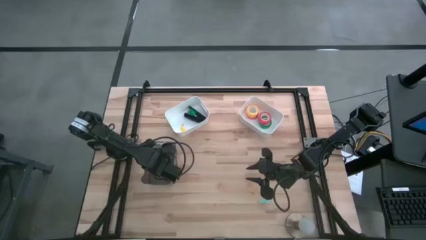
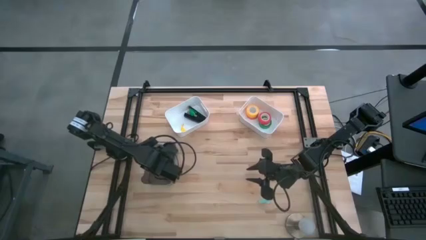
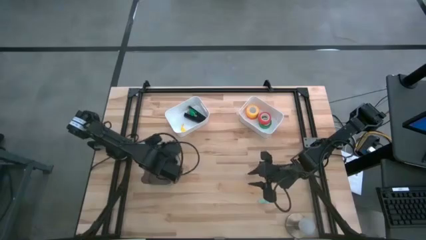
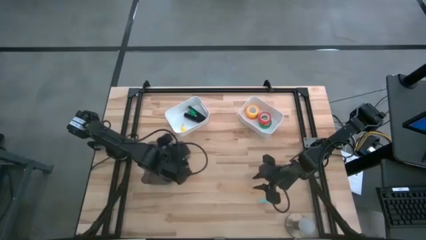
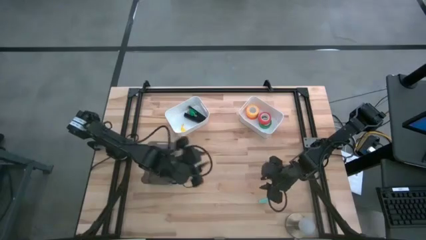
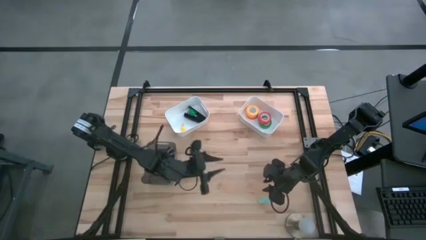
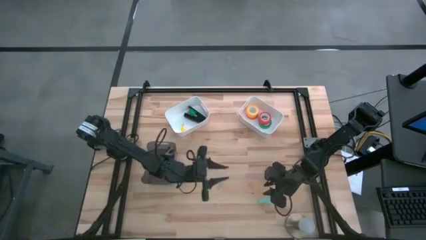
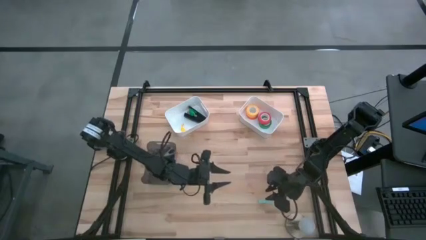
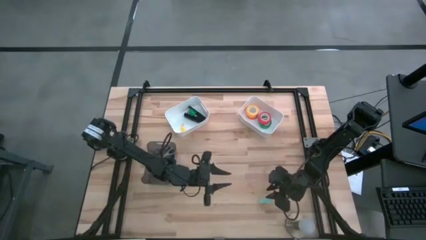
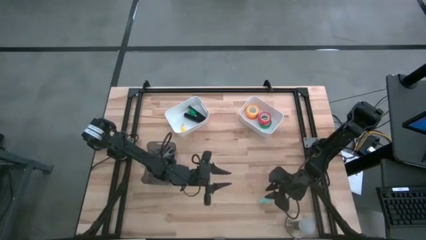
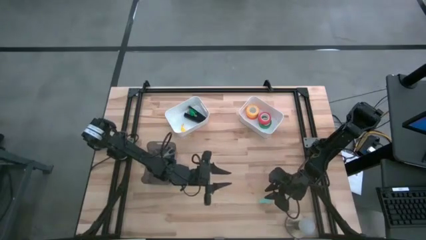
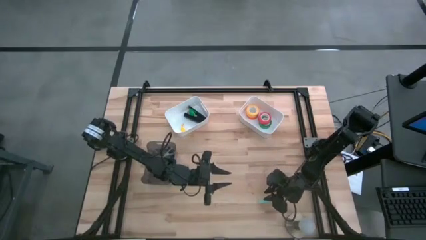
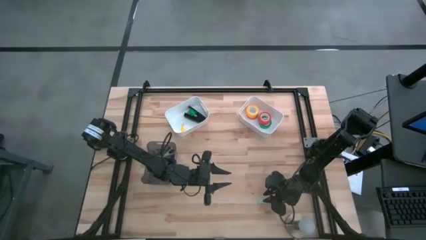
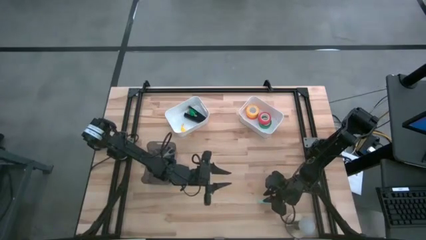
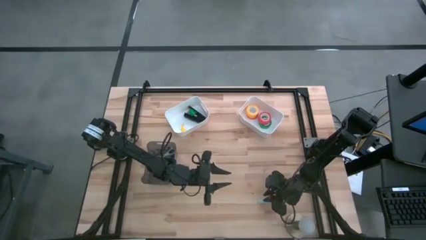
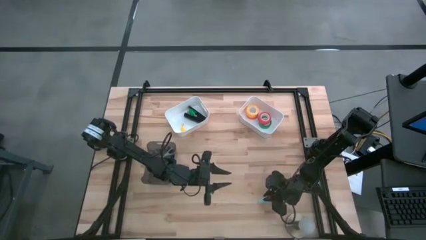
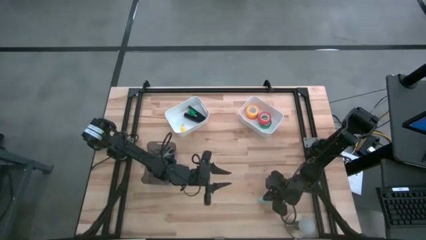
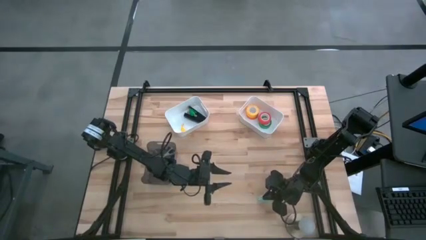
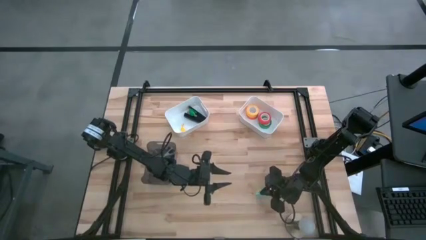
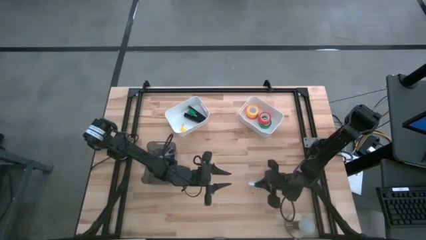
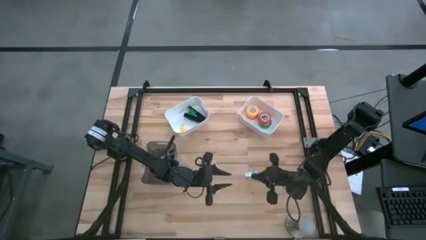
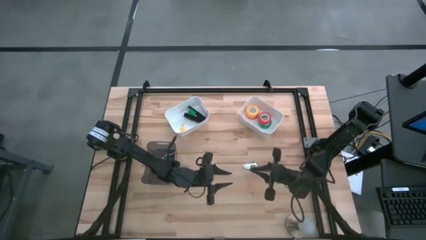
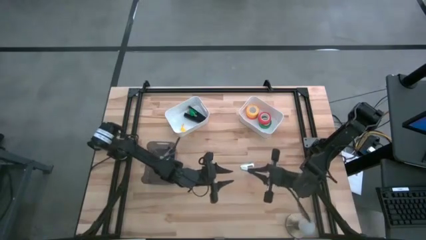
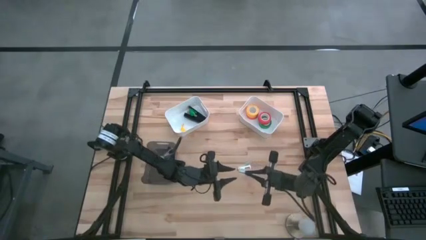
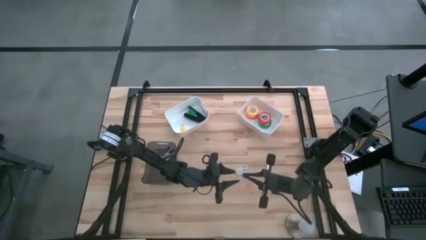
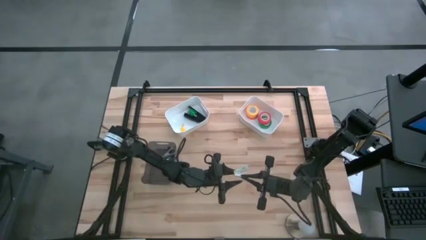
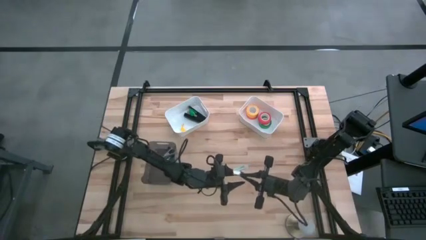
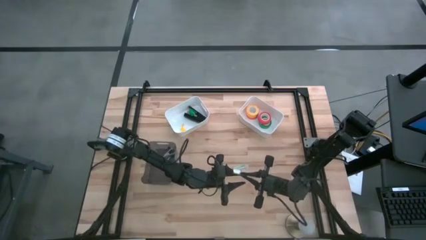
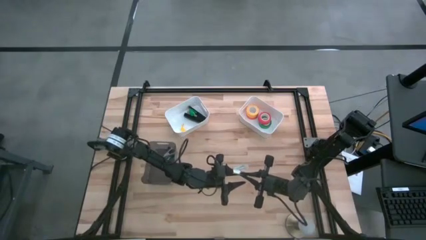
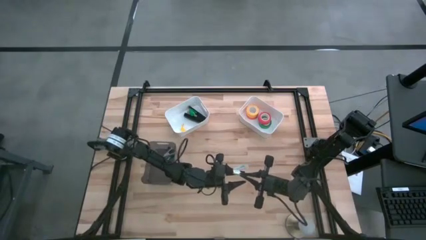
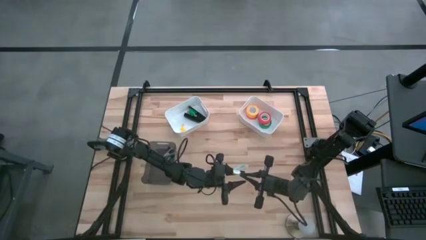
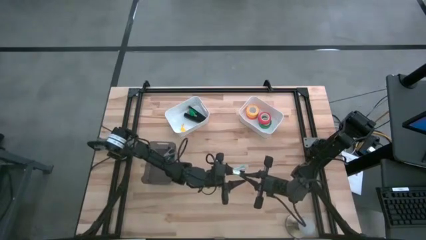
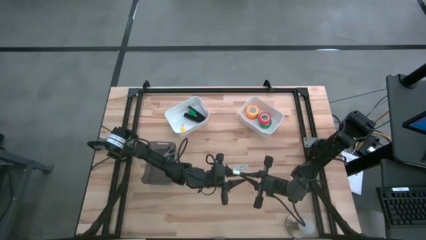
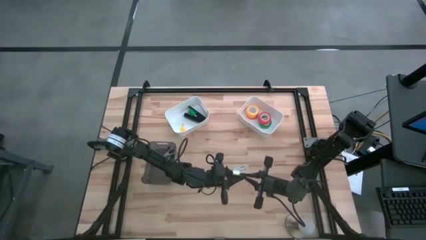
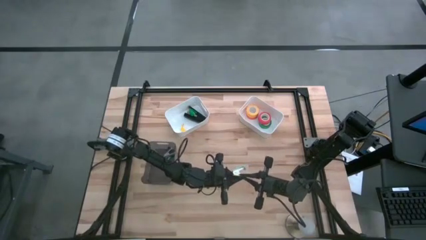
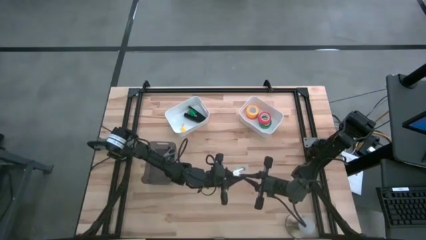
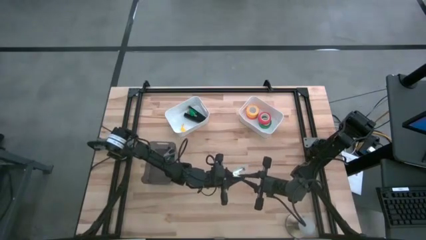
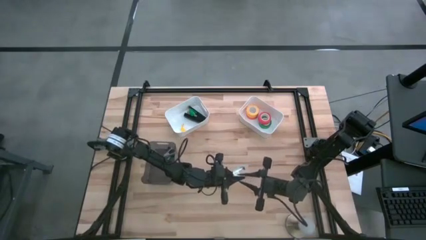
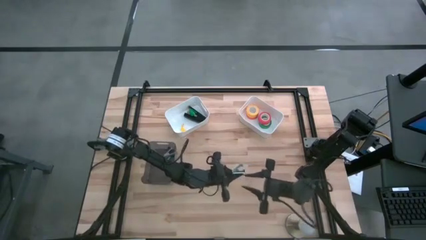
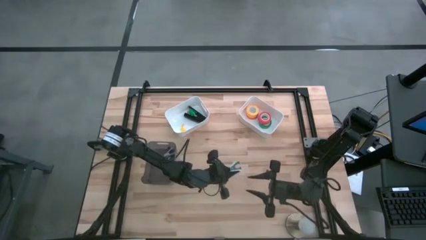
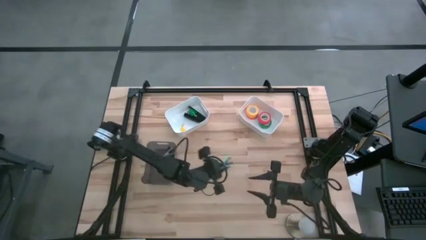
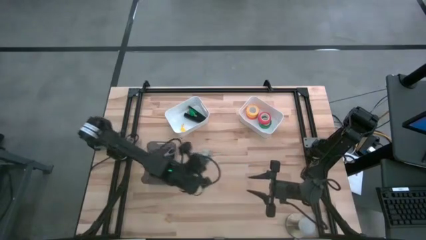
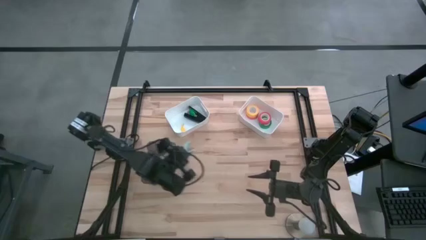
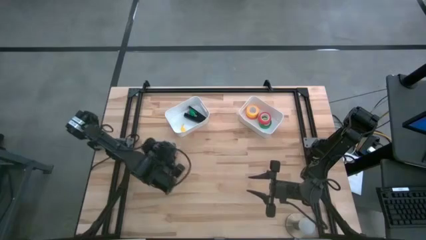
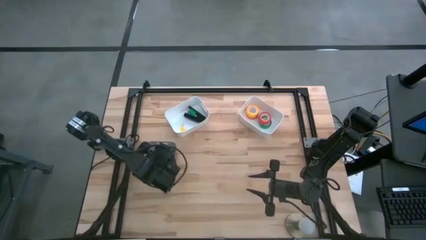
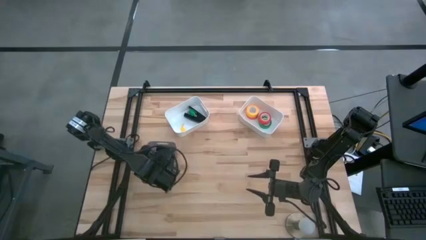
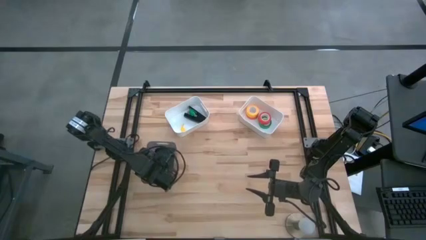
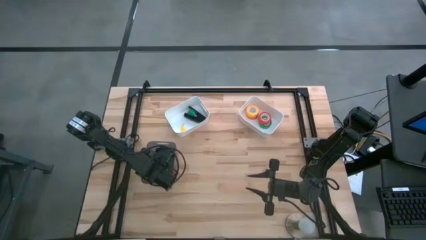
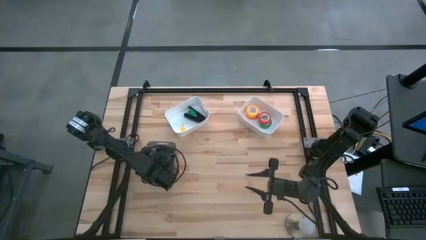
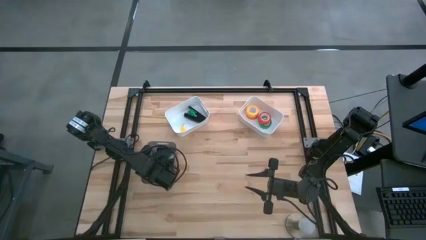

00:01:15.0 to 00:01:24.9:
Task: Pick and place Stapler, Stapler remover, tape
Put the blue staple remover into the black bin

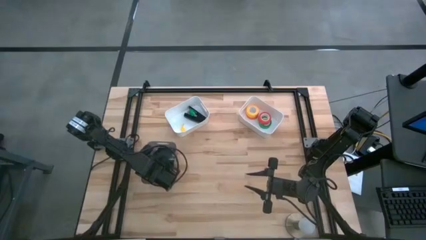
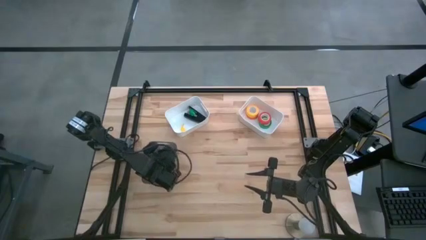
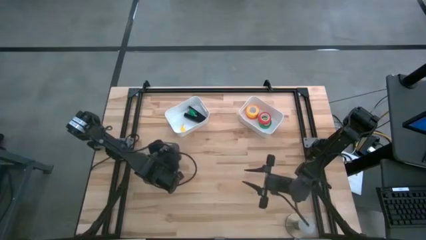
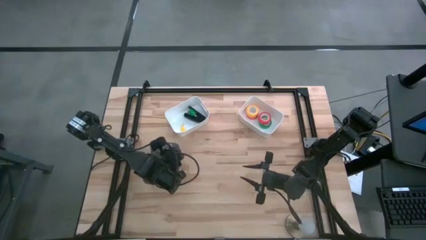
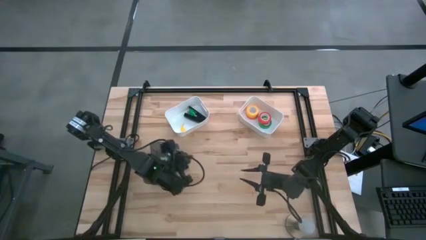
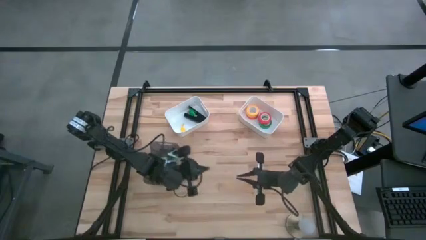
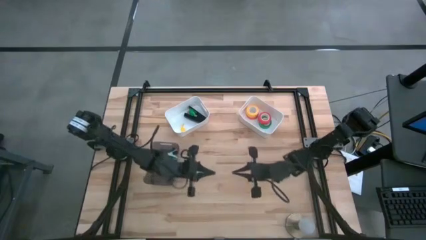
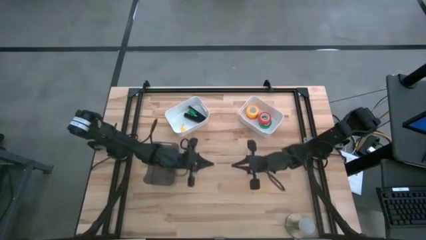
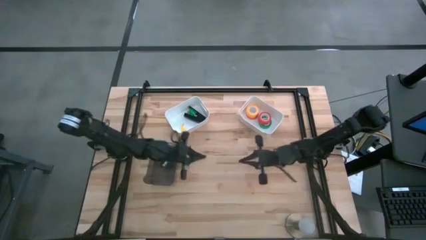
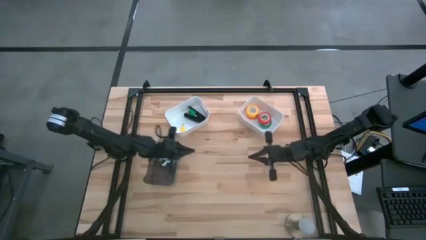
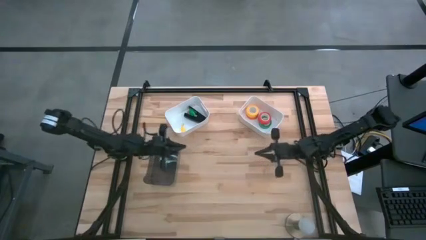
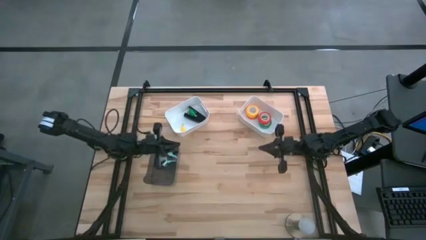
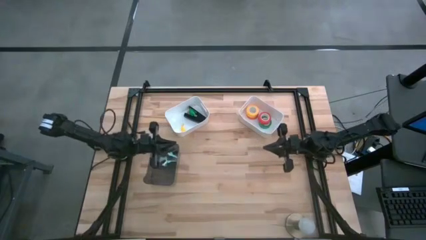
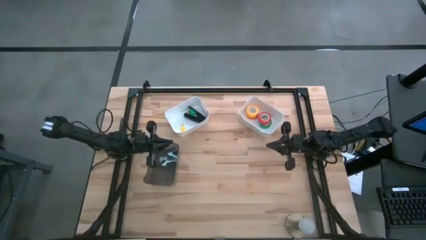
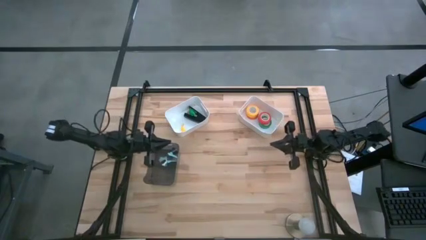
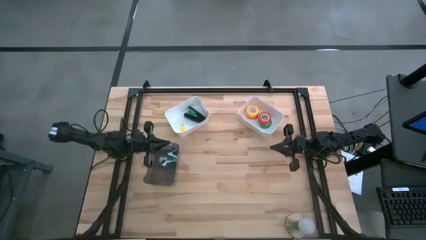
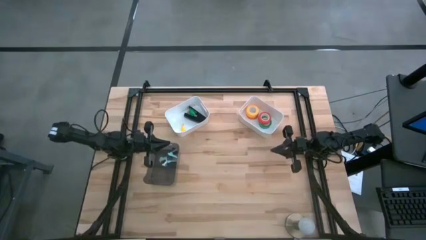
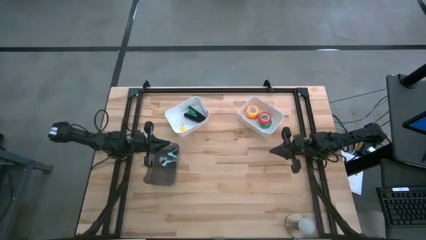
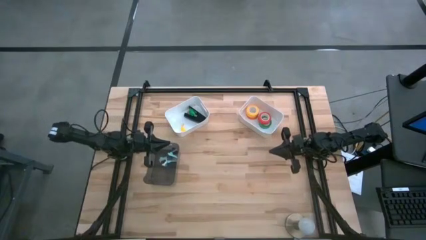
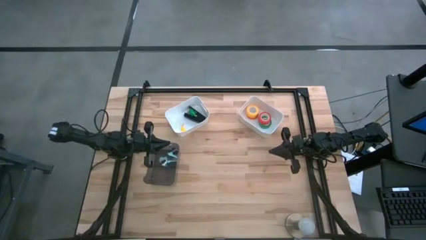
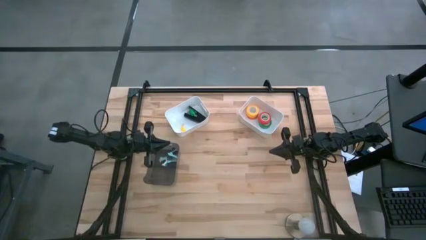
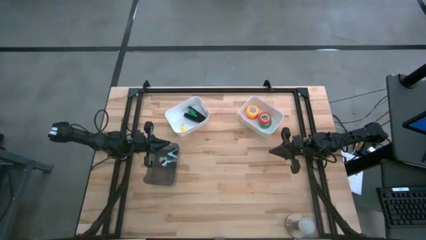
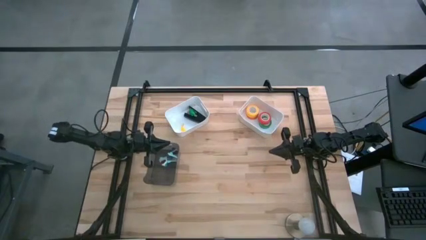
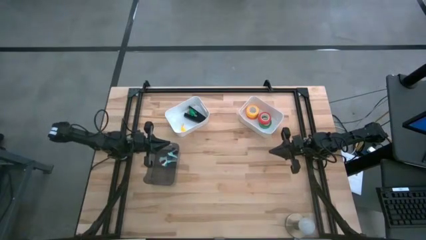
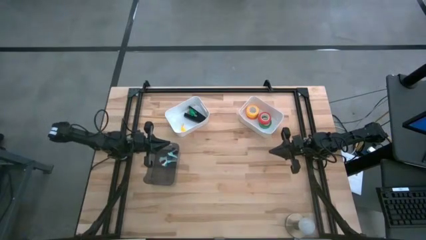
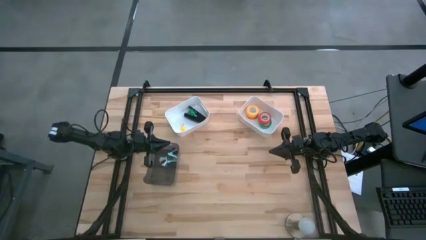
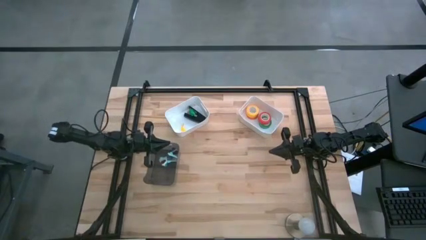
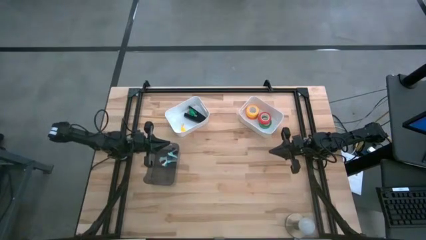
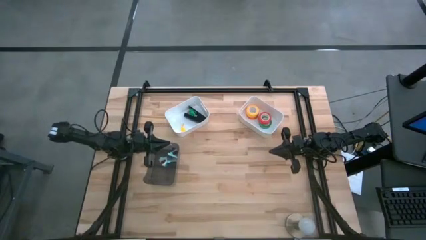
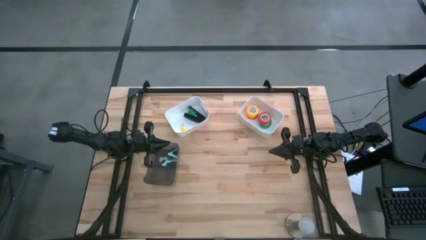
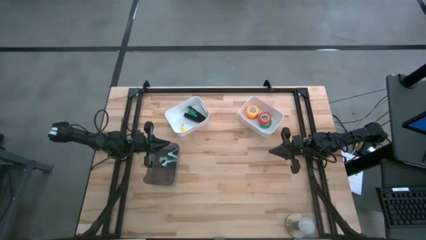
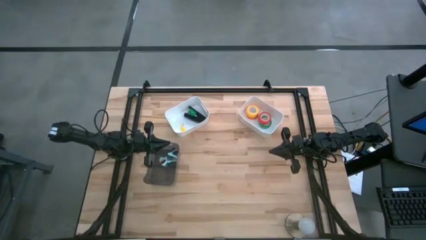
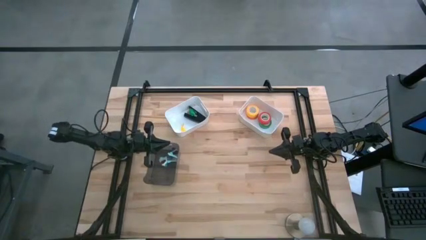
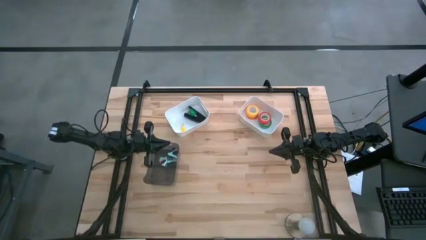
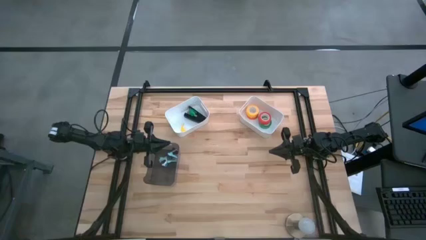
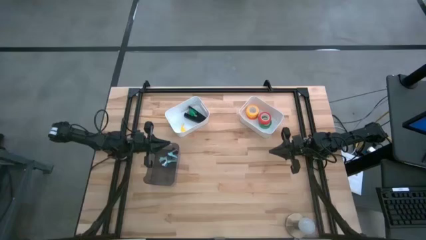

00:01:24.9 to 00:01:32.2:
Return to Home Position
